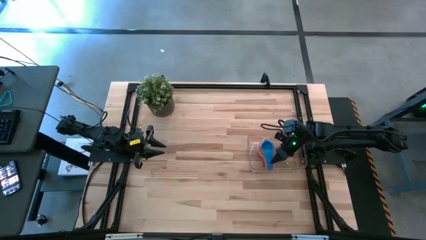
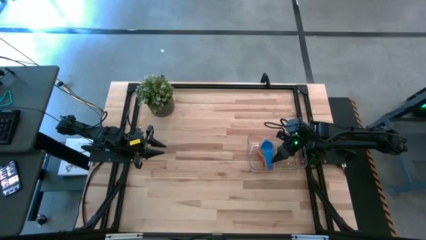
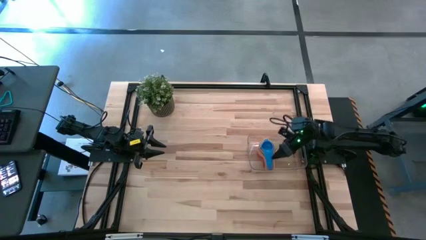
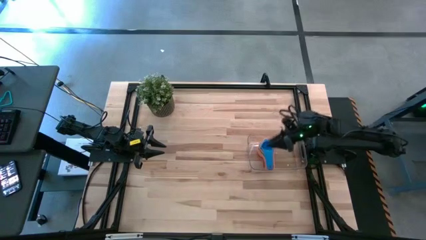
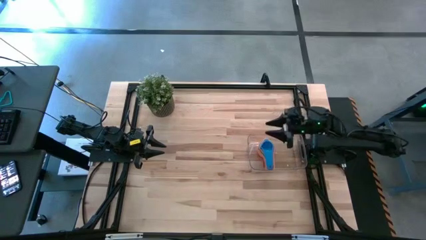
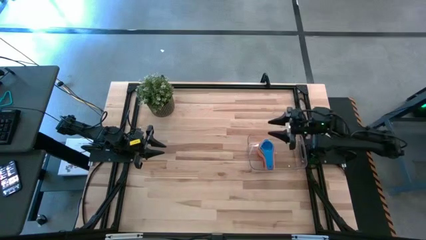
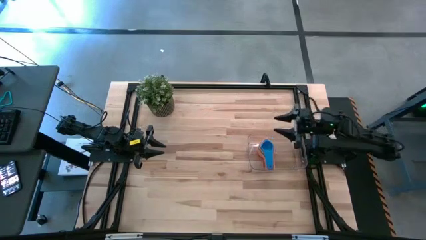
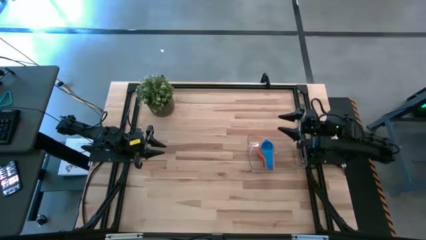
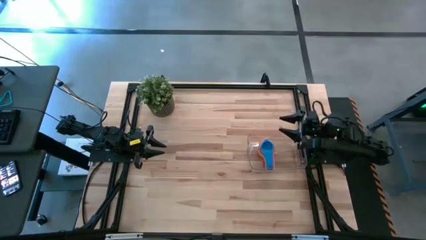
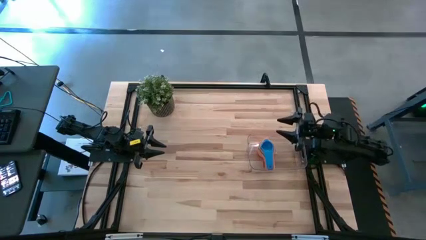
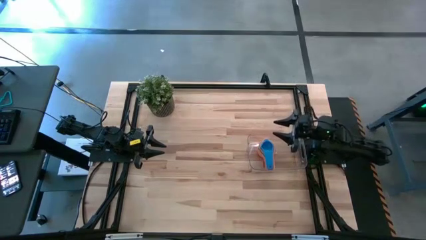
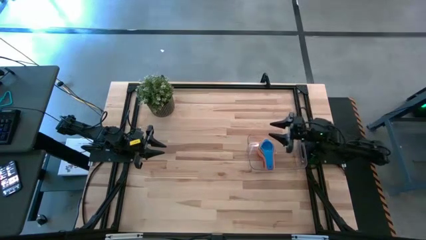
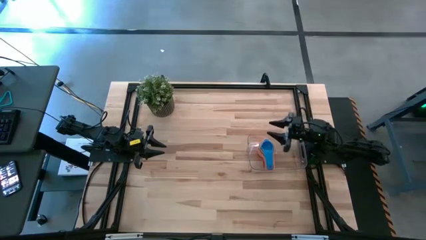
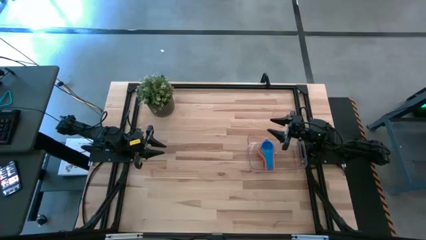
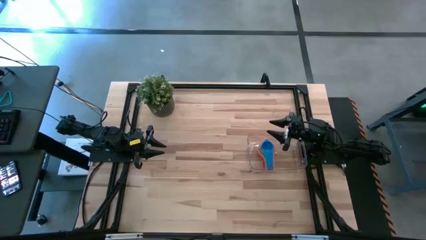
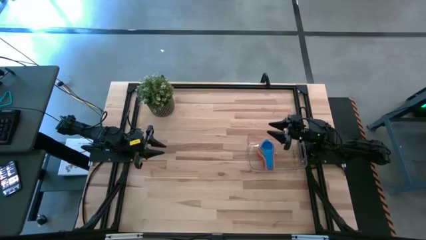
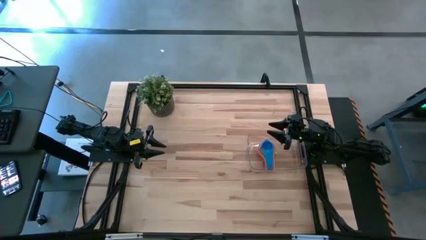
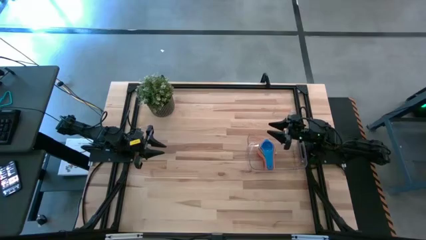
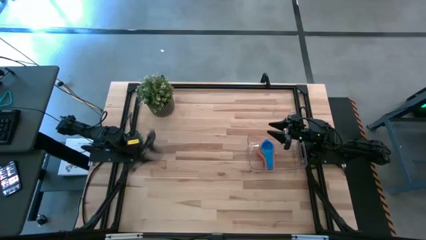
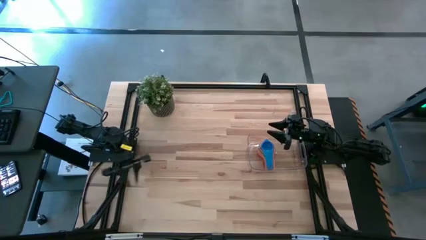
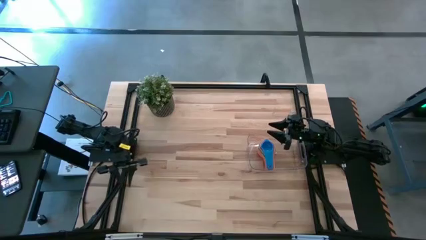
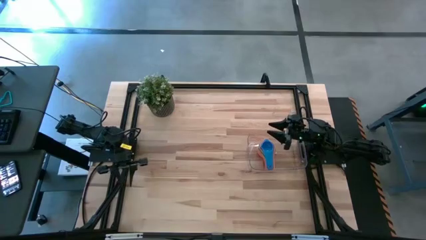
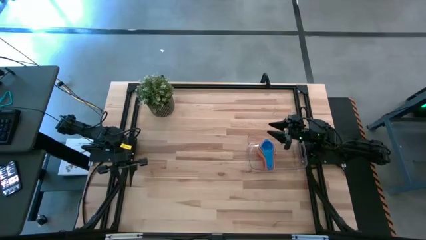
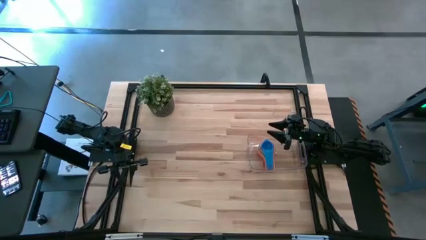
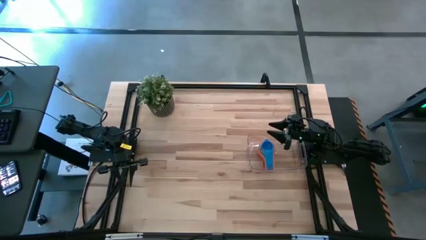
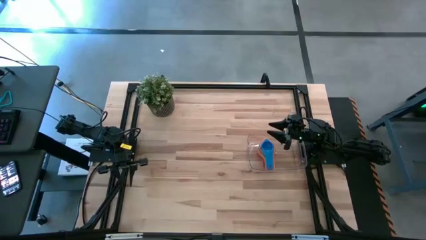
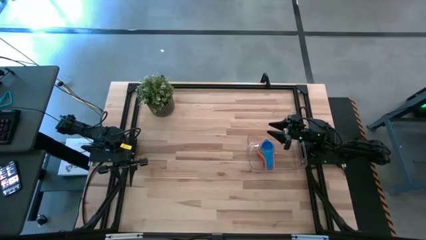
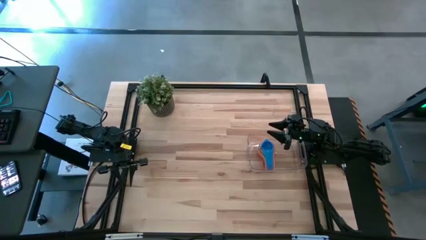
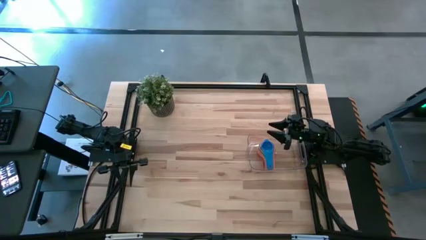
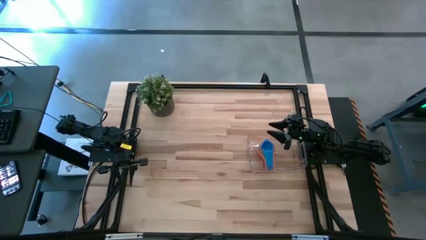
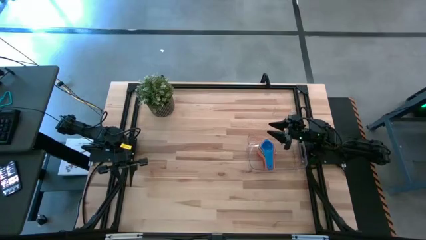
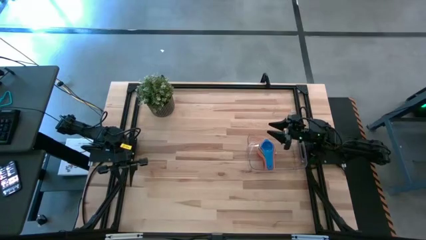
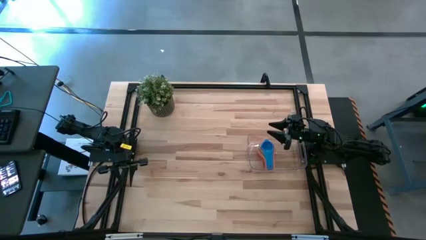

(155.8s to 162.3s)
Task: Nest measuring cups in basket
Return to Home Position

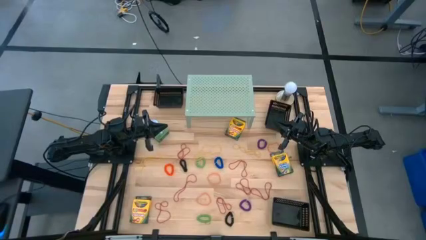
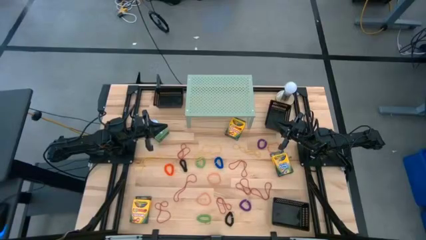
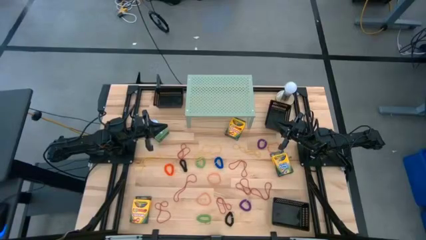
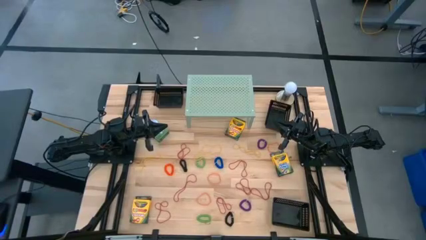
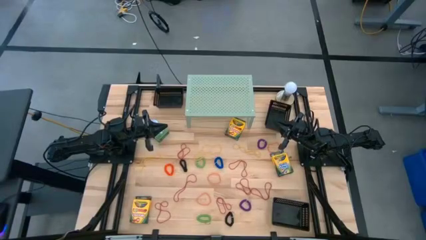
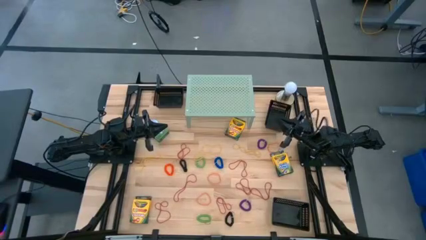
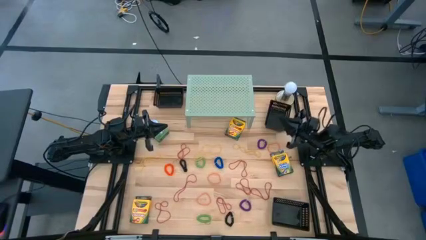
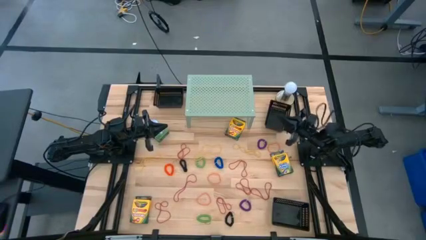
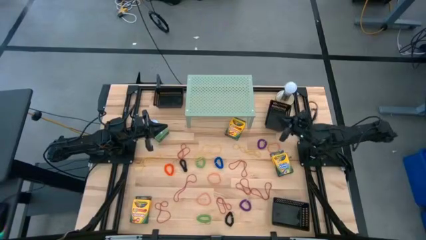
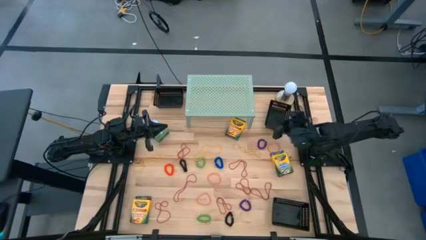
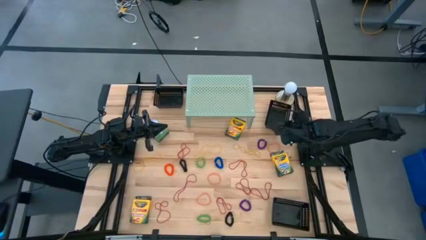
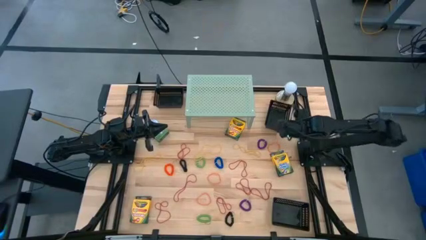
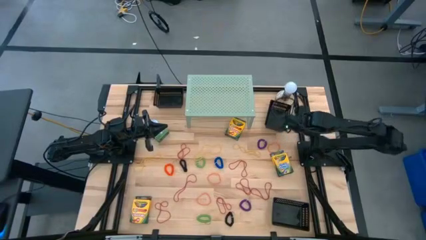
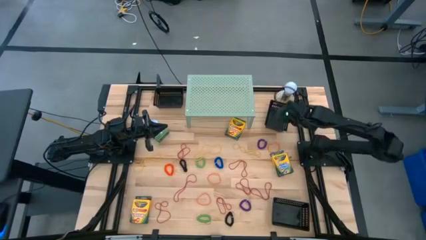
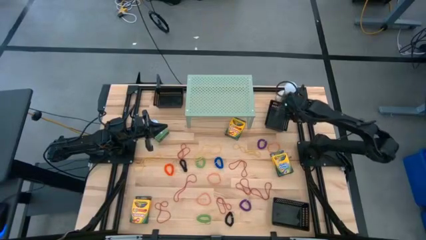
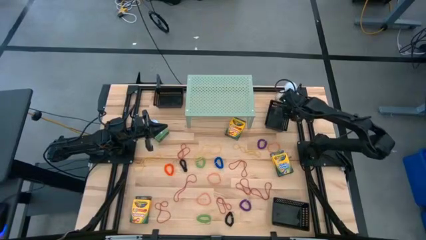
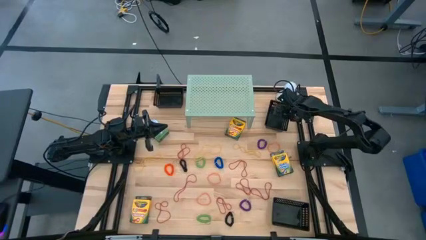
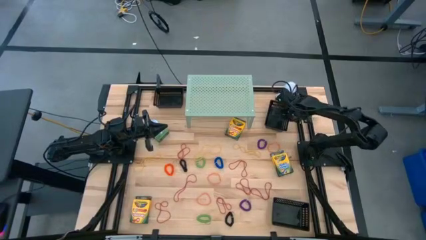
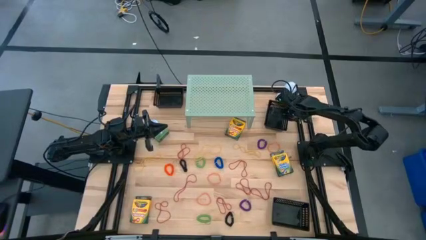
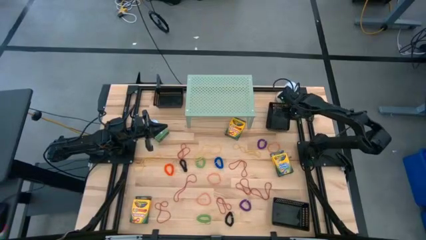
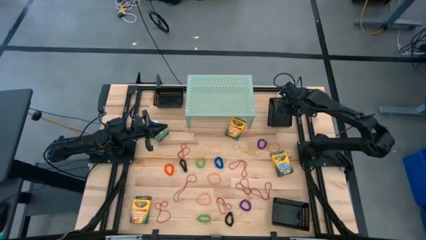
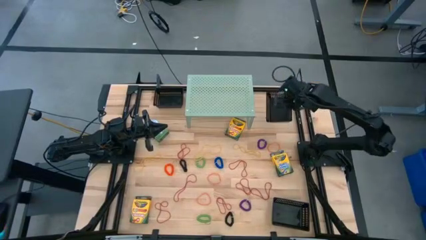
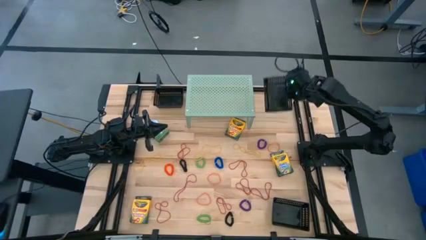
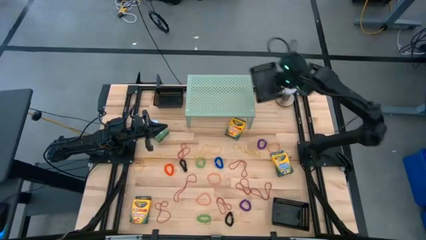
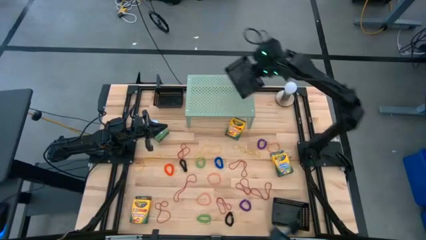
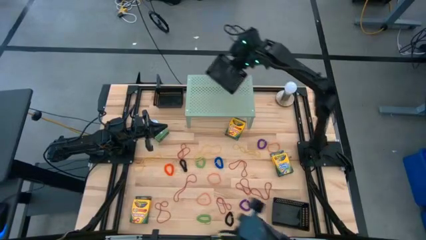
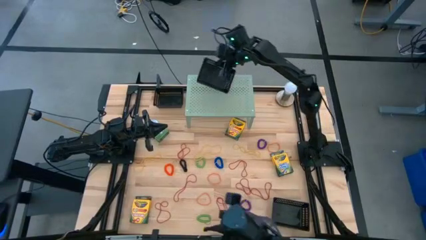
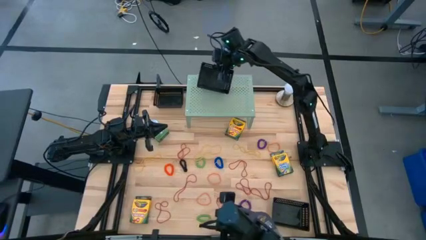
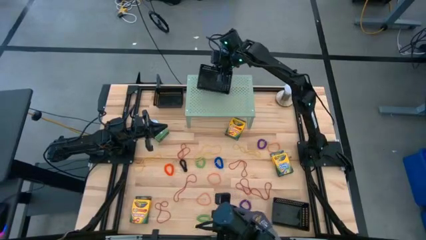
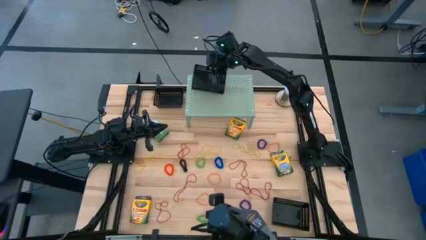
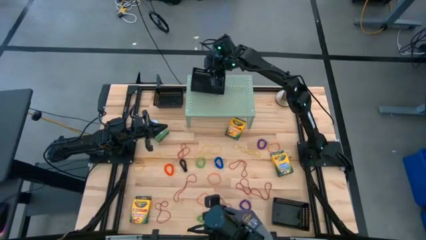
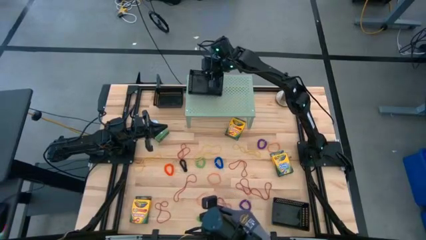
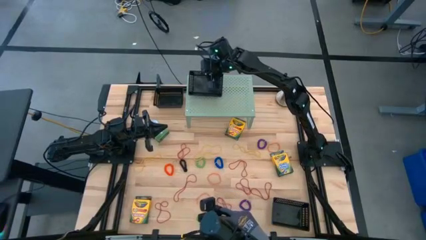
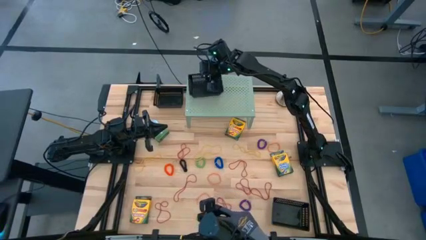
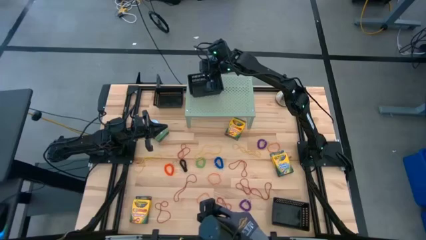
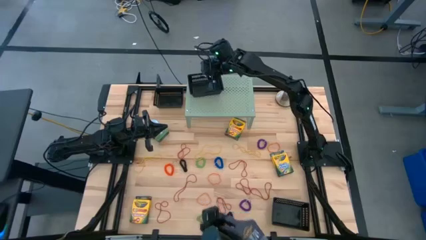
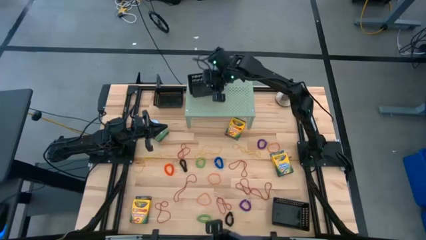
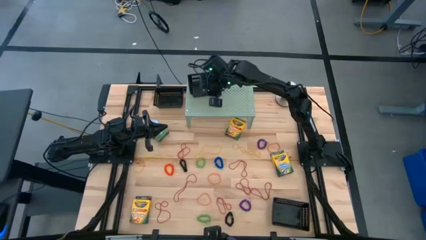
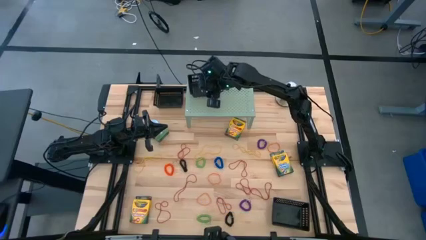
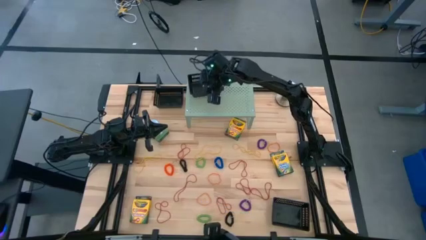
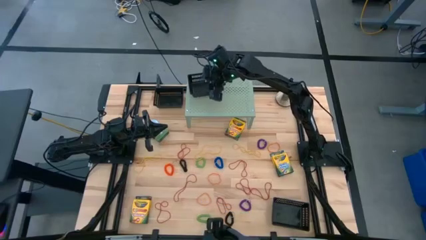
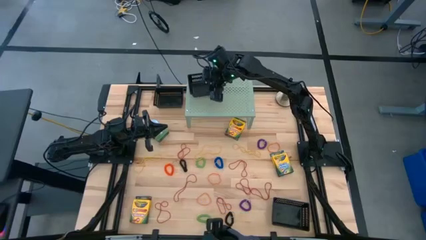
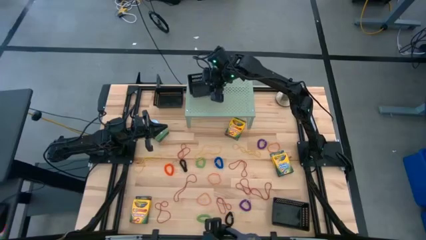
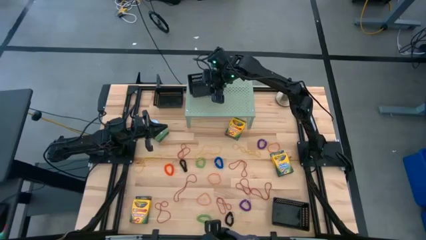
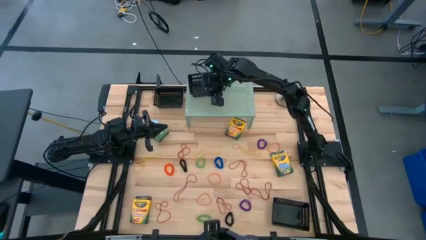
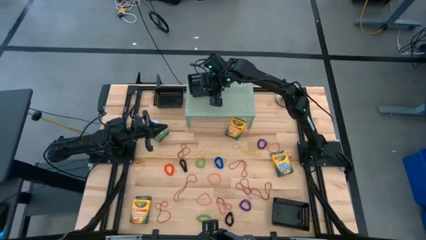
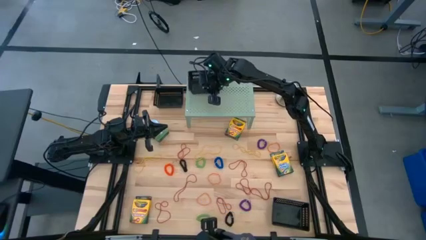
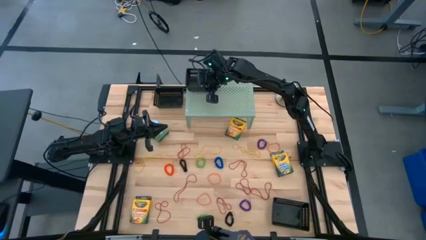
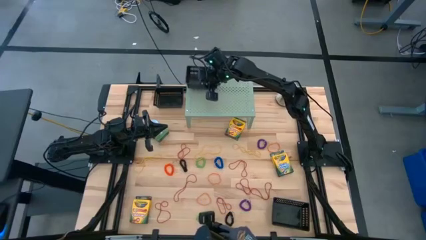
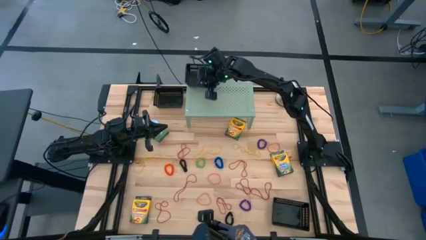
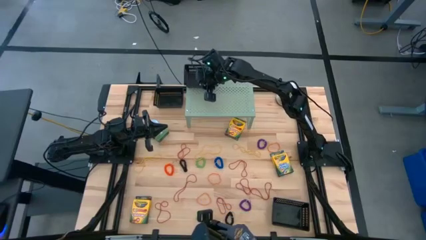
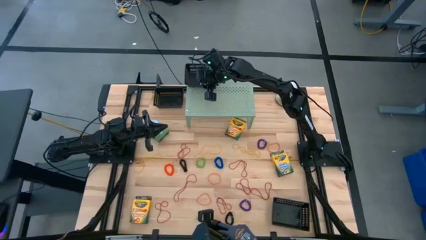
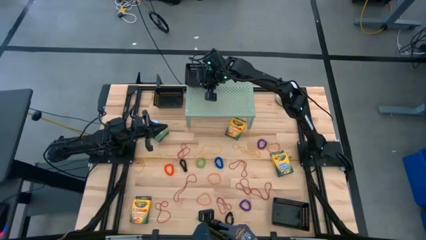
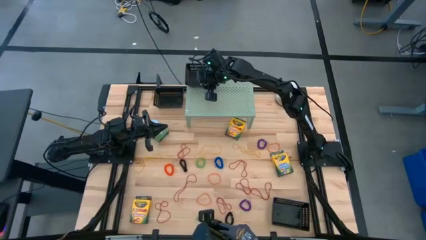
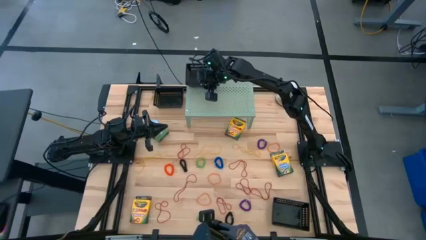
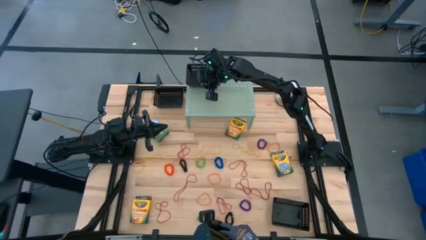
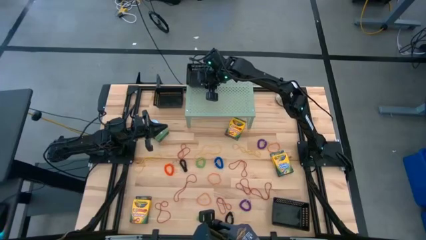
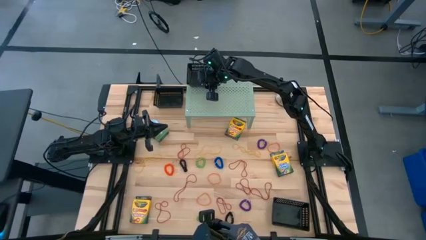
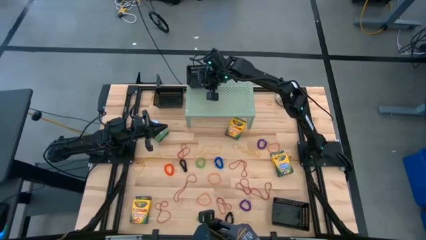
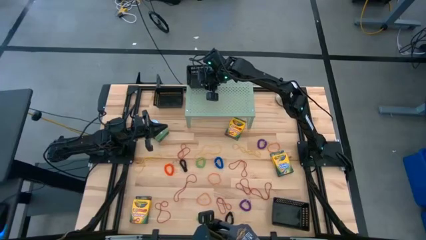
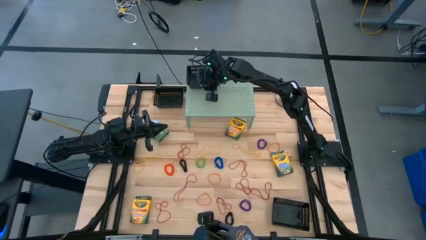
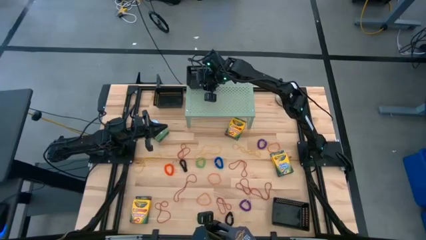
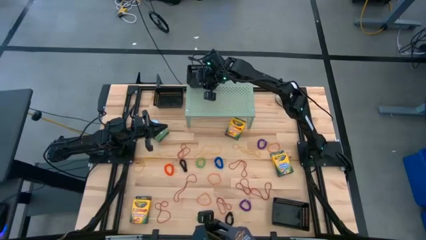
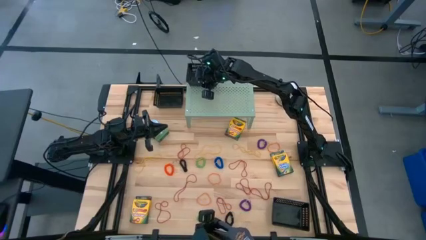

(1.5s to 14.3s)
Task: Pick & Place Office Desk Supplies
Put the top right black bin on the shelf
